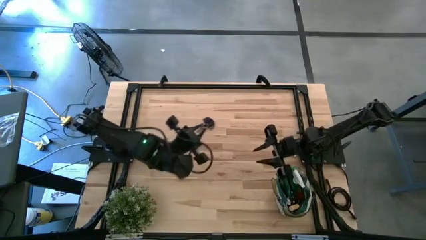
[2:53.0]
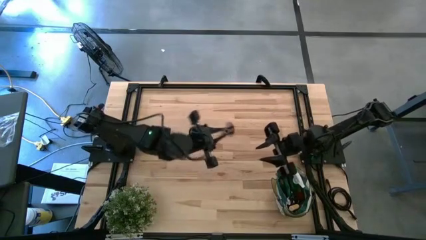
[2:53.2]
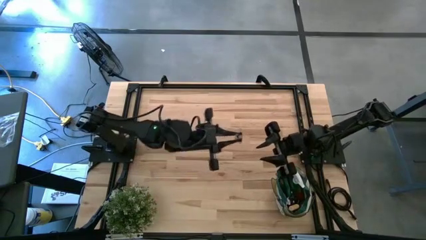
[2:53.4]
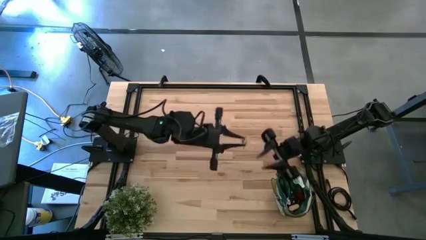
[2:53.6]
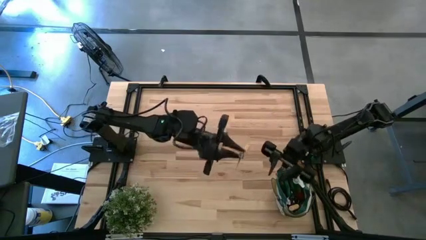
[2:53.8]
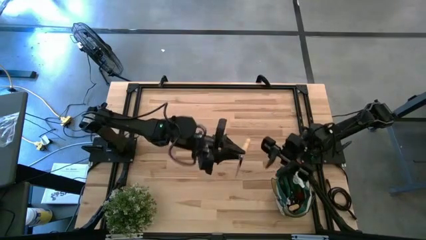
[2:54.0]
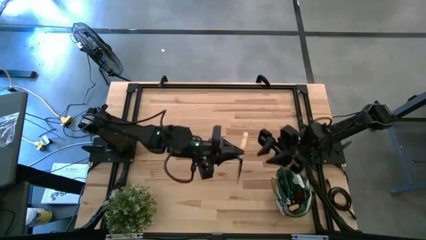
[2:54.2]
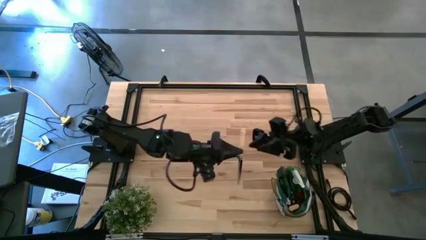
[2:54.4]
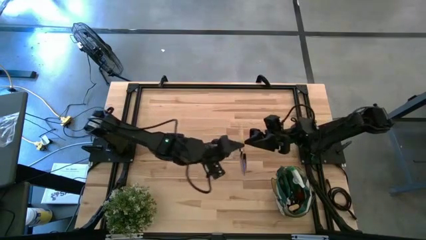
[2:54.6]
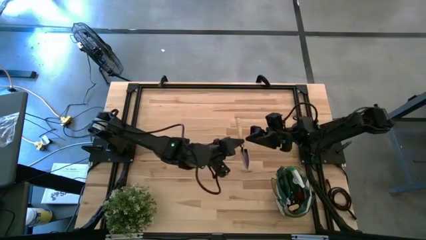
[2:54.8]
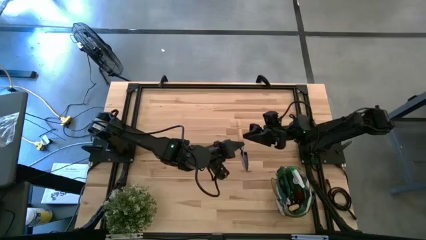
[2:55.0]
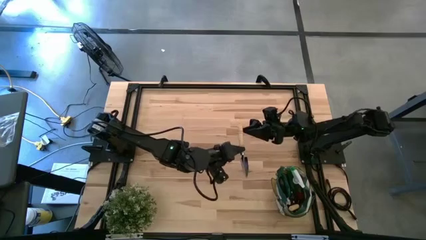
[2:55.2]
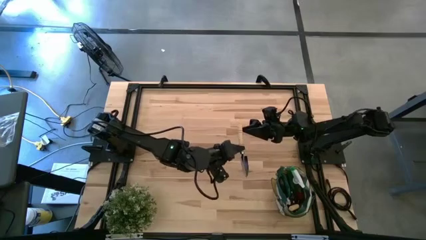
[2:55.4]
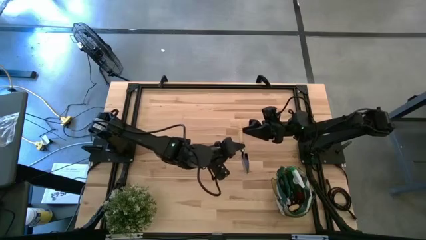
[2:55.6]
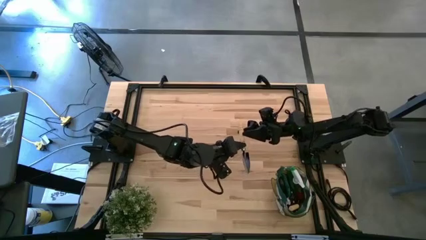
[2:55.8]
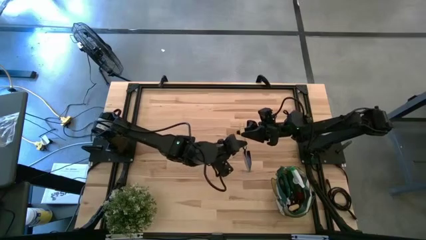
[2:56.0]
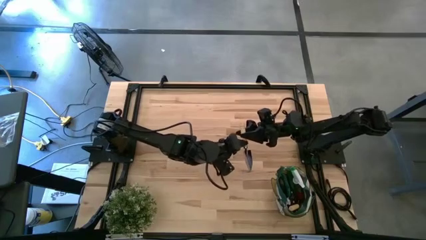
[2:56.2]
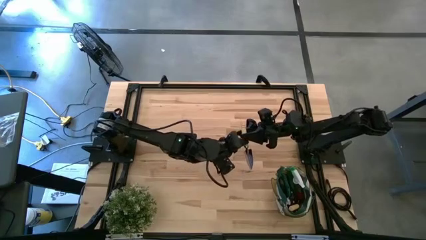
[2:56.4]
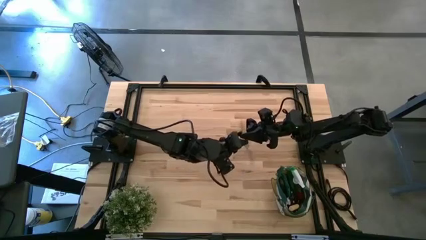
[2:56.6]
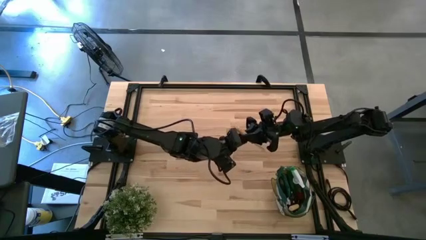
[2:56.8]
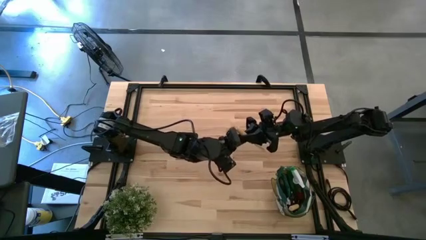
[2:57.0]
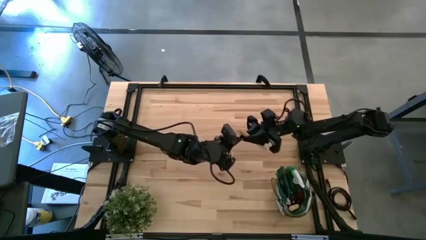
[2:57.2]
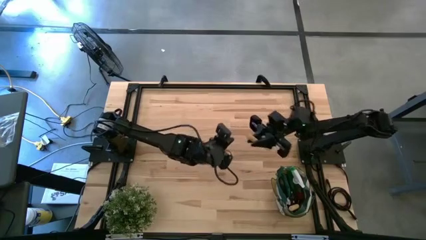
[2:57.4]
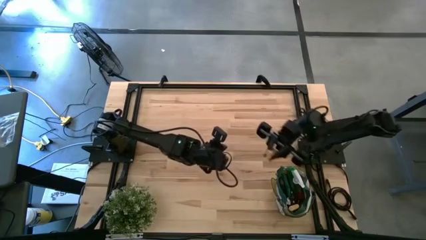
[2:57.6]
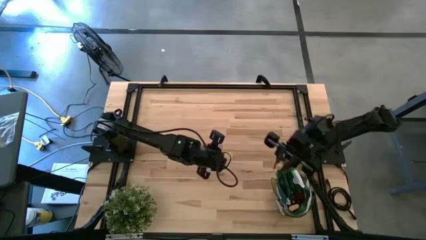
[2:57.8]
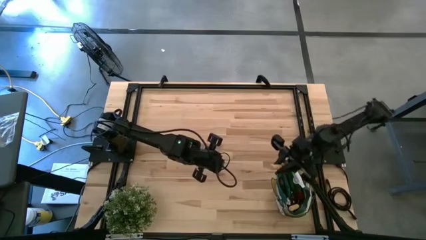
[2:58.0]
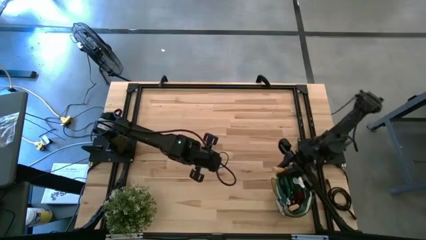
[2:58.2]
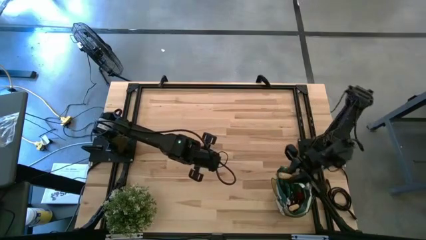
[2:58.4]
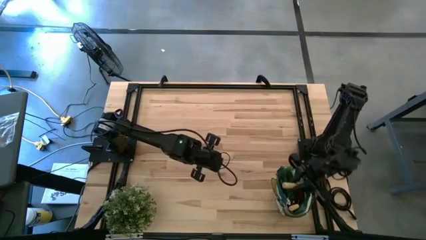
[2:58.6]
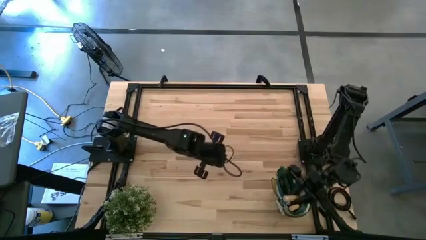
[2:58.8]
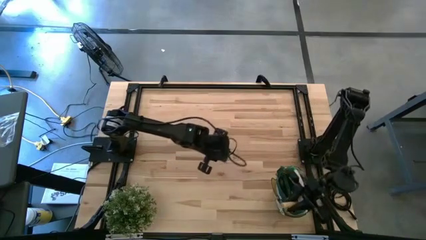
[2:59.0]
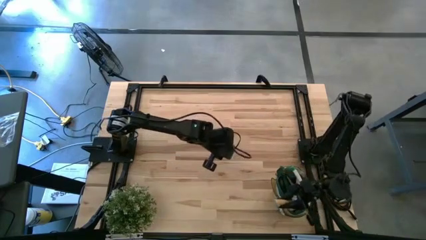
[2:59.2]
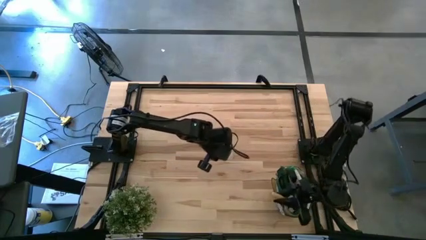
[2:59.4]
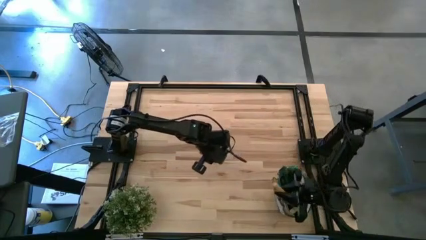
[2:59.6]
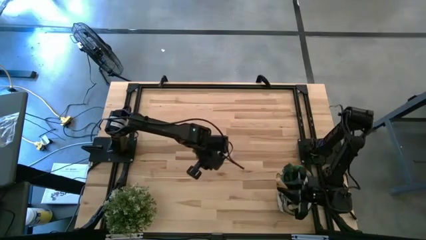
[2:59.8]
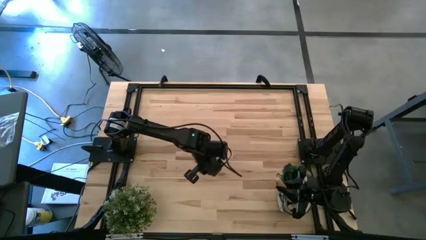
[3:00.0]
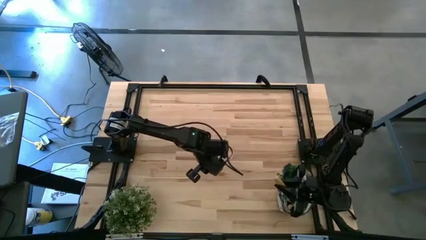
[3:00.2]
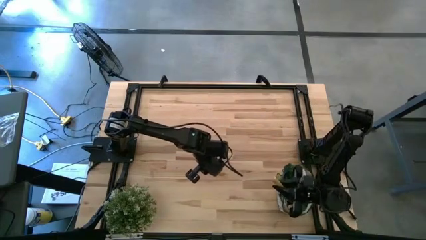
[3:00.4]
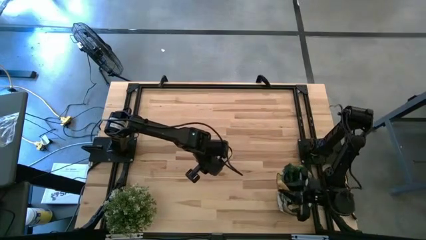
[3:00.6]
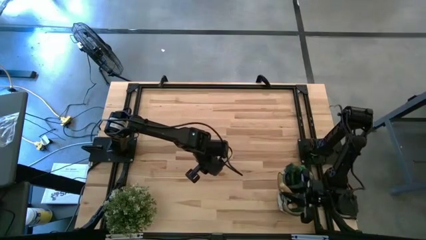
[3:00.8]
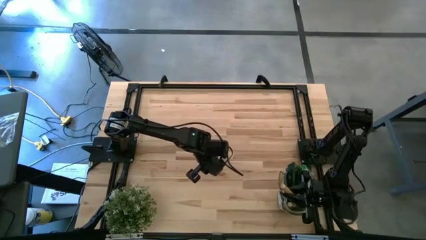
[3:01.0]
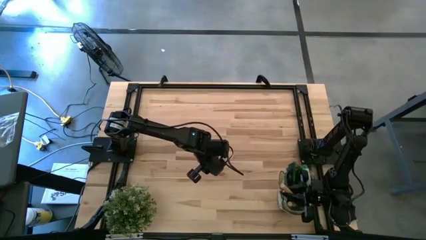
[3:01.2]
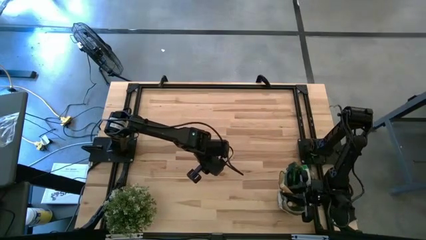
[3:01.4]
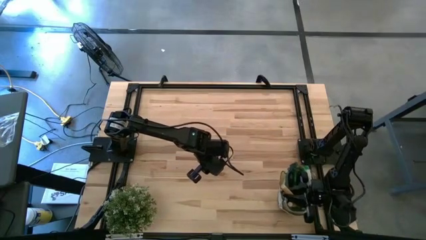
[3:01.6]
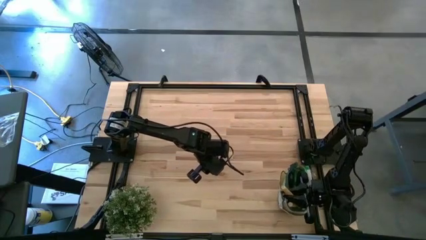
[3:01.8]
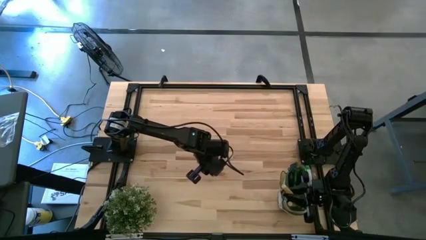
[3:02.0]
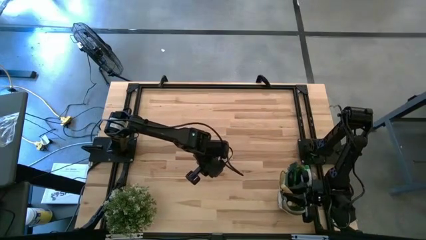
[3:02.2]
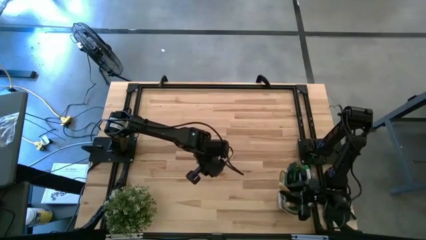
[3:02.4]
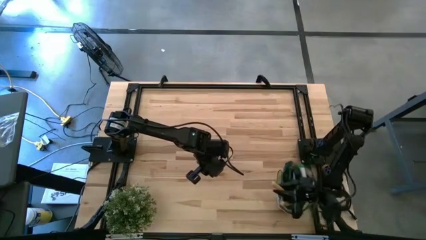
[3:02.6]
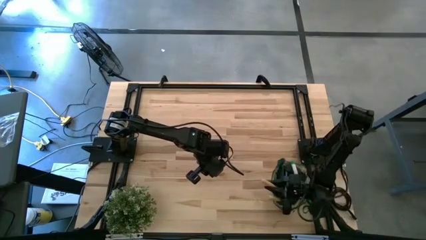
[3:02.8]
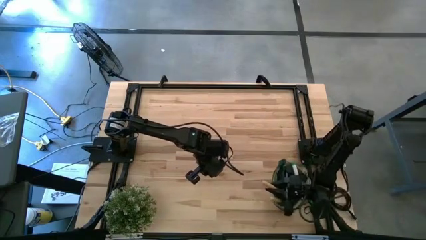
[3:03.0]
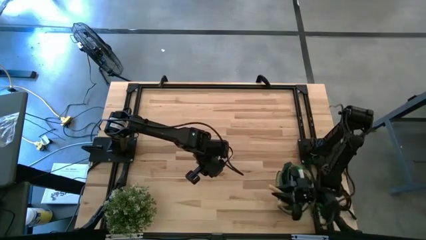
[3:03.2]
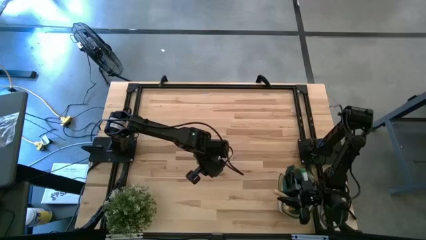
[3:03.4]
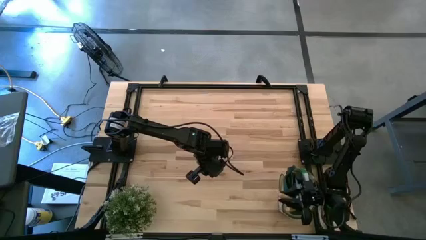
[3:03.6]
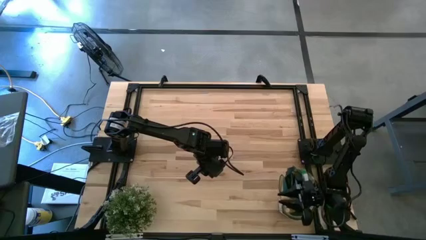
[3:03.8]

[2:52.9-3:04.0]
Task: Pick & Place Garden tools in Gardening bag
Put the brown trowel into the green gardening bag

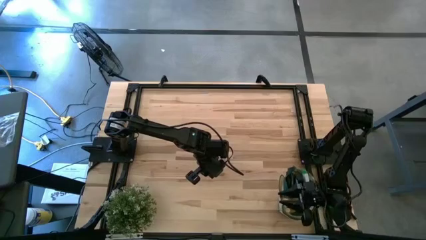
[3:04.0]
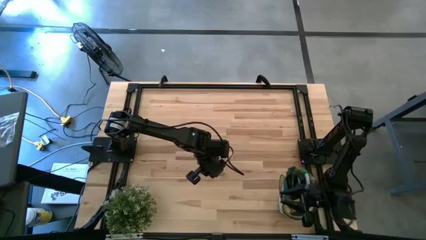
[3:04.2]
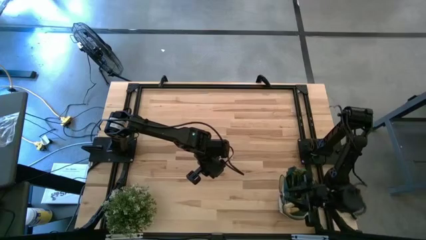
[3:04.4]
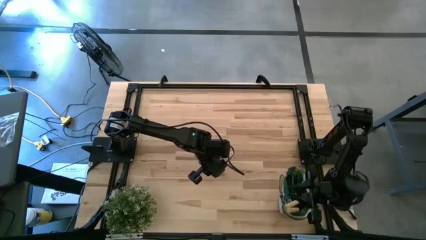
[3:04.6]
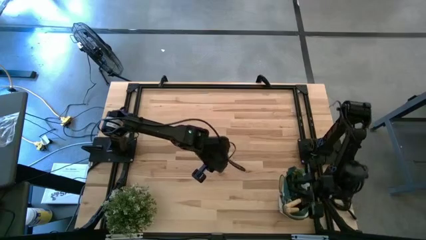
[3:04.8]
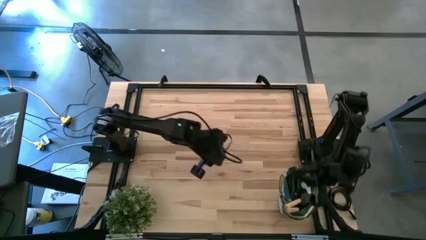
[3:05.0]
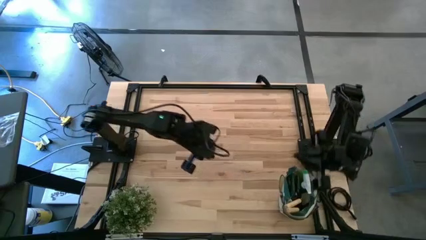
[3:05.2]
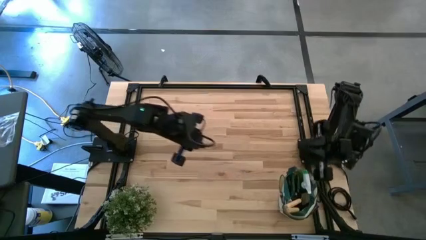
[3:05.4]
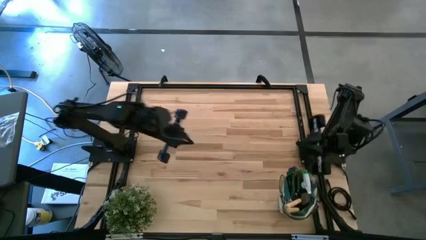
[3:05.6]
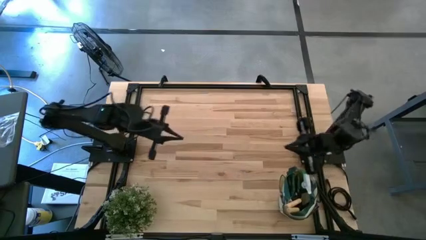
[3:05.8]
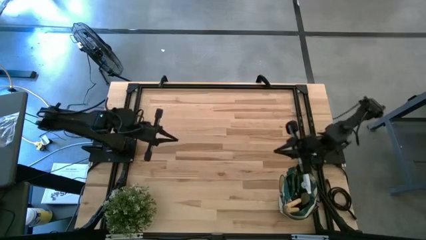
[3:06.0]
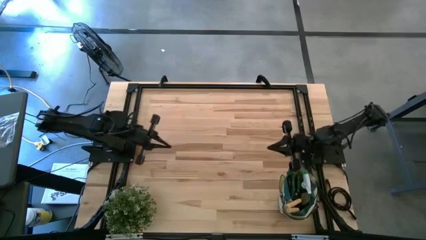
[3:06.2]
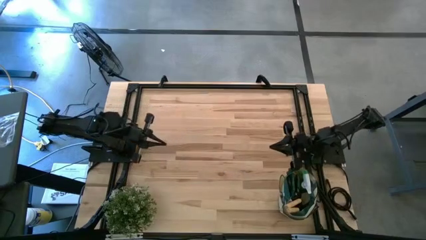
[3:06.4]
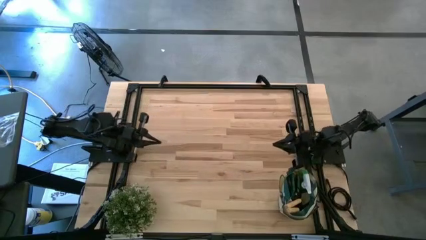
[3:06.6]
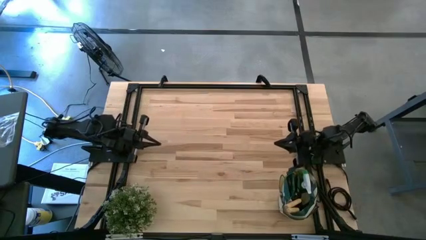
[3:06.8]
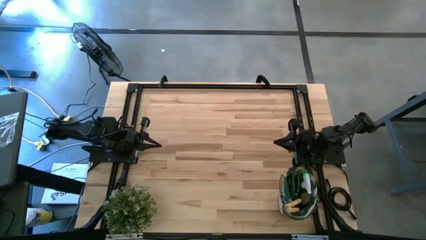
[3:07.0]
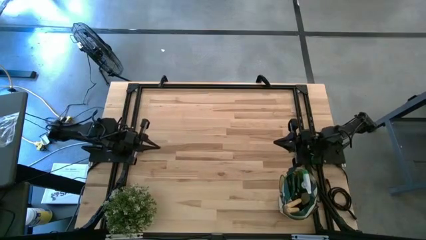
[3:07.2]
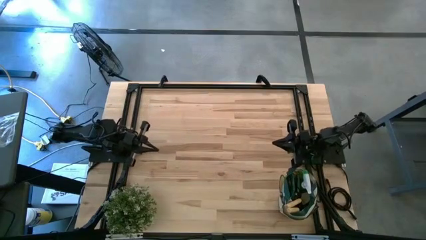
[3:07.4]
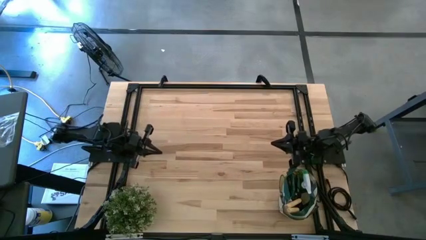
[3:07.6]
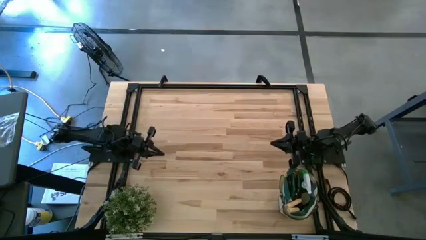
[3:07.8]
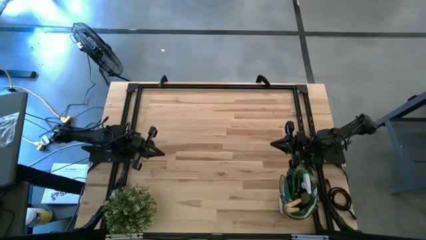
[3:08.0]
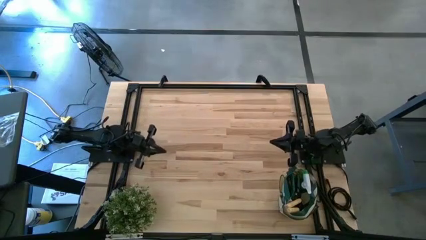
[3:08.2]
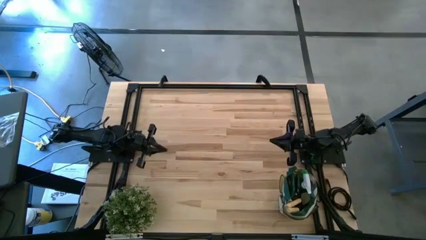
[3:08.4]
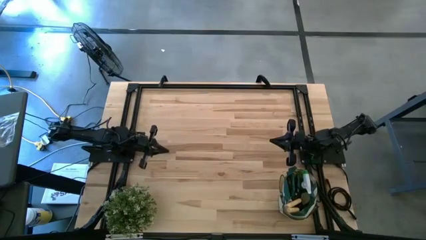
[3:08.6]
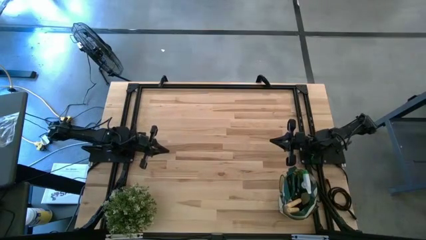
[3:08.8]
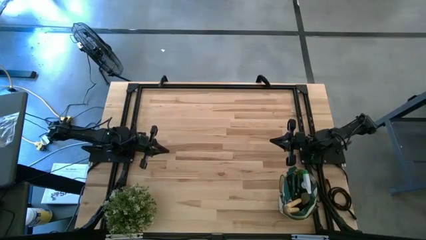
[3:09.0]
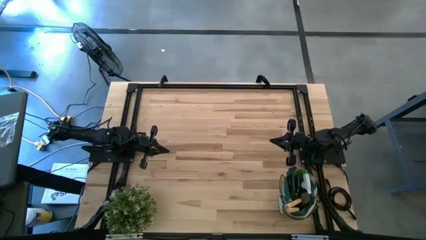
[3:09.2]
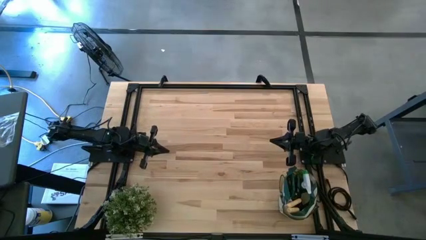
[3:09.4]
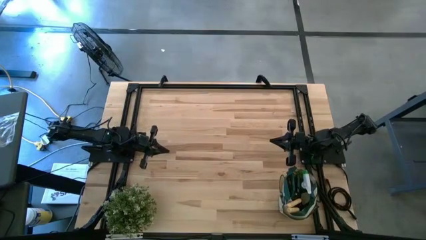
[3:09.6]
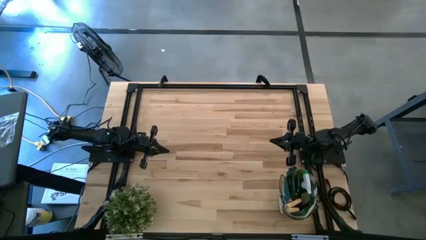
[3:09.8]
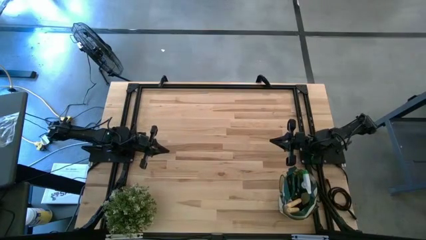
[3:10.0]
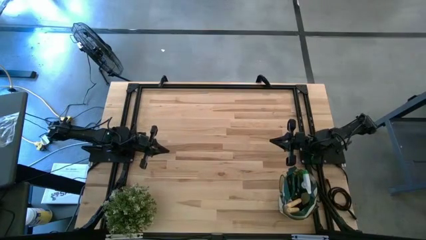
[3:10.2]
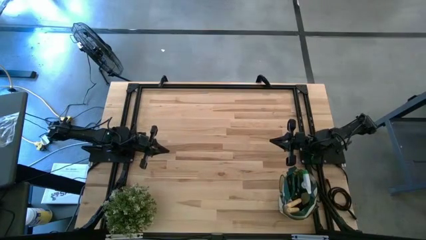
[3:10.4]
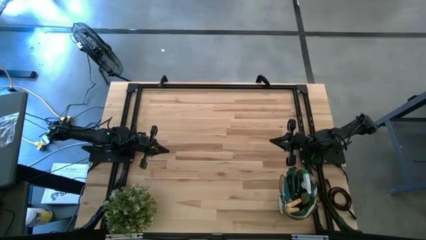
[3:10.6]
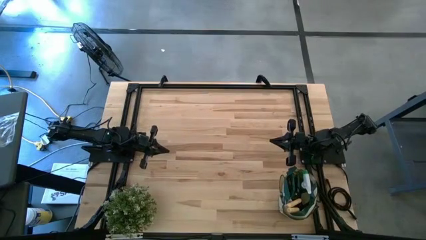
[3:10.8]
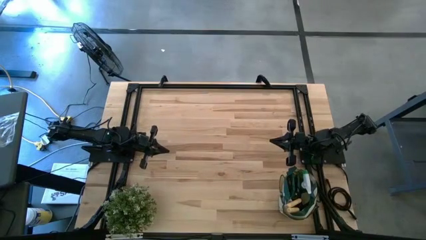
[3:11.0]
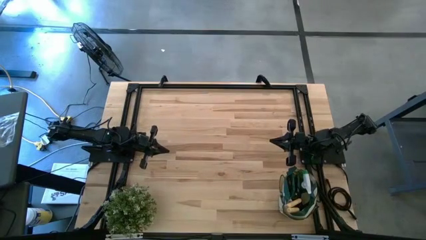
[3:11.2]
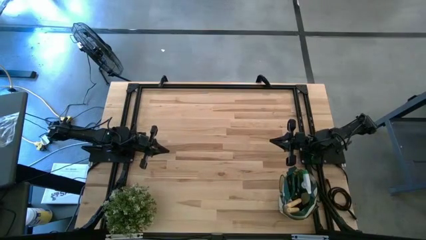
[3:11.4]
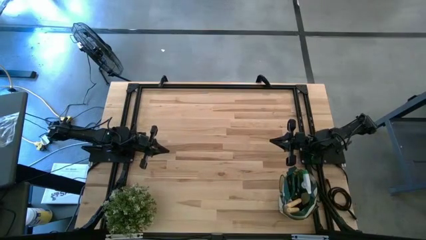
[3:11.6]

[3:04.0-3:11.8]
Return to Home Position
